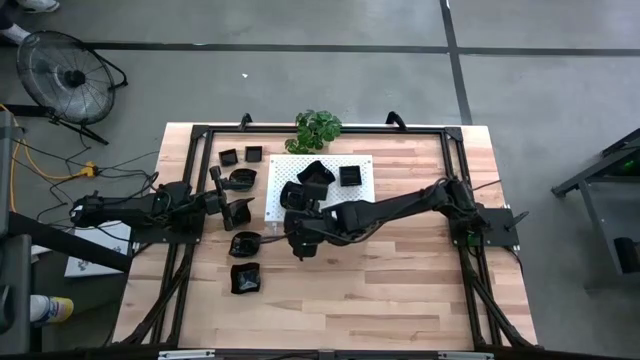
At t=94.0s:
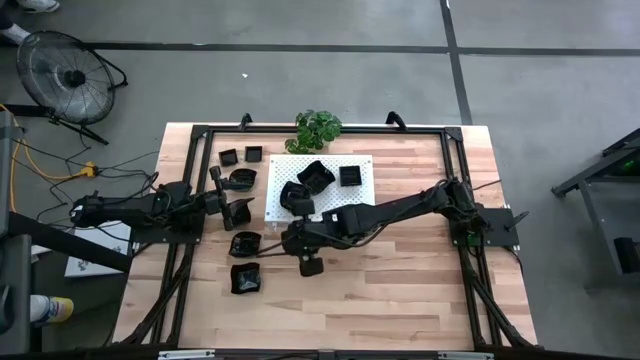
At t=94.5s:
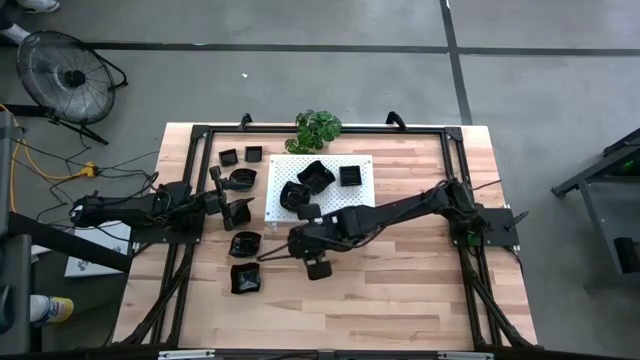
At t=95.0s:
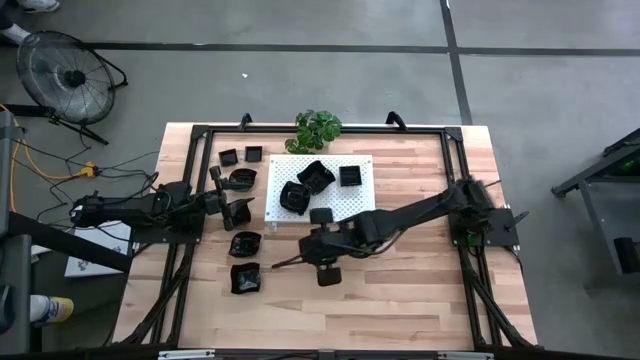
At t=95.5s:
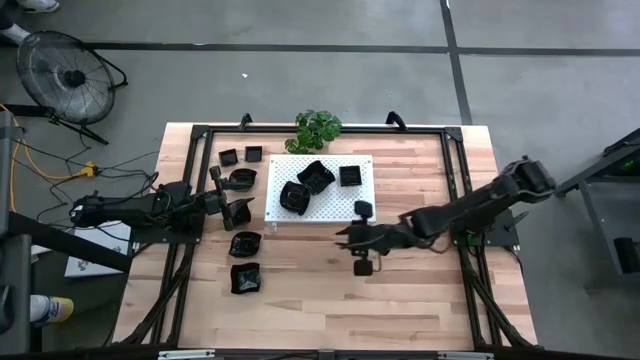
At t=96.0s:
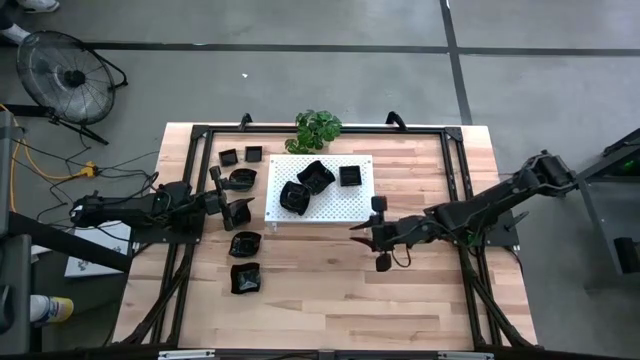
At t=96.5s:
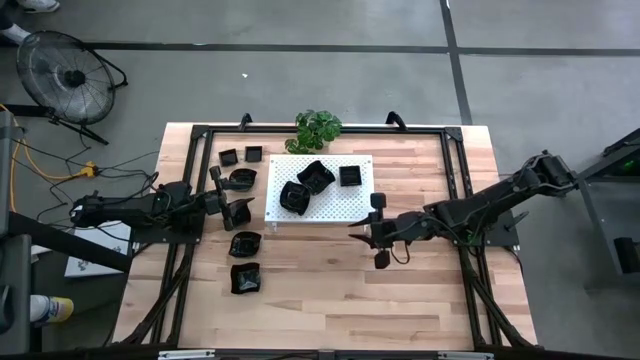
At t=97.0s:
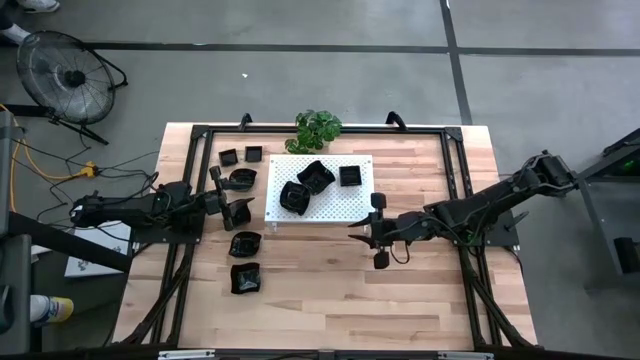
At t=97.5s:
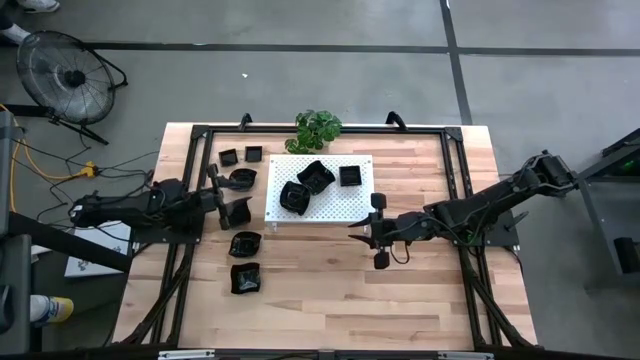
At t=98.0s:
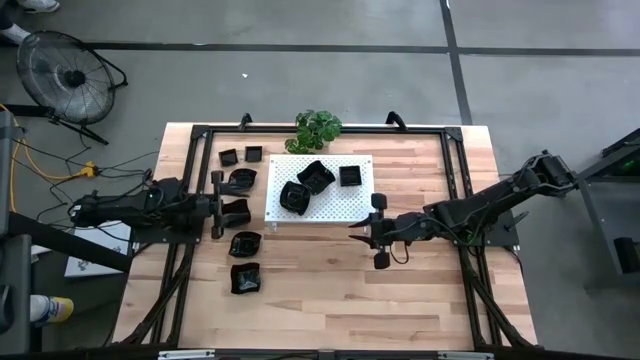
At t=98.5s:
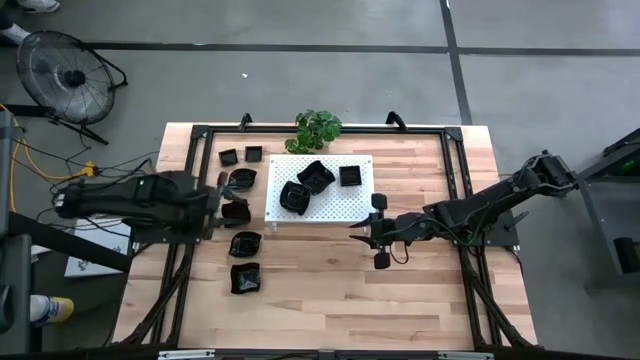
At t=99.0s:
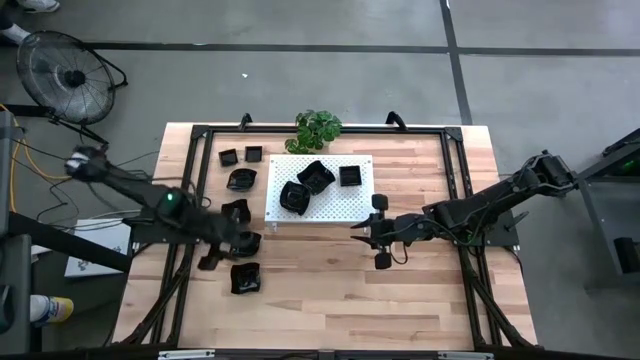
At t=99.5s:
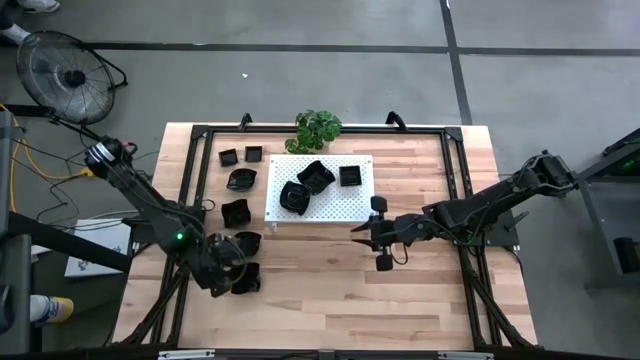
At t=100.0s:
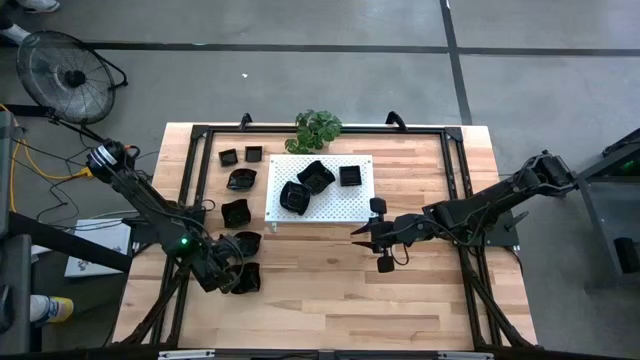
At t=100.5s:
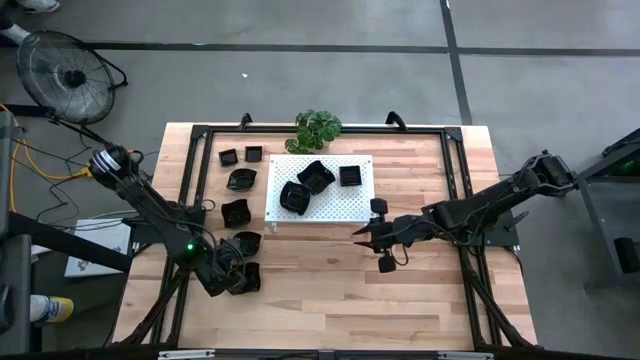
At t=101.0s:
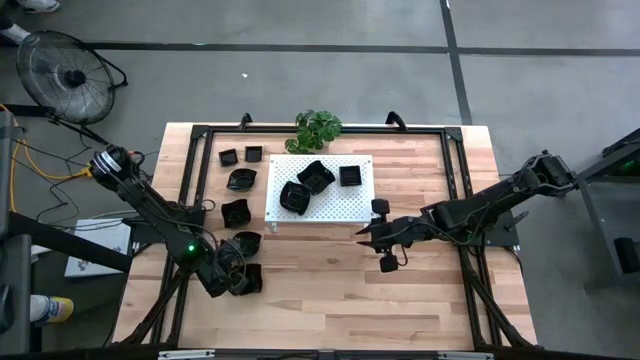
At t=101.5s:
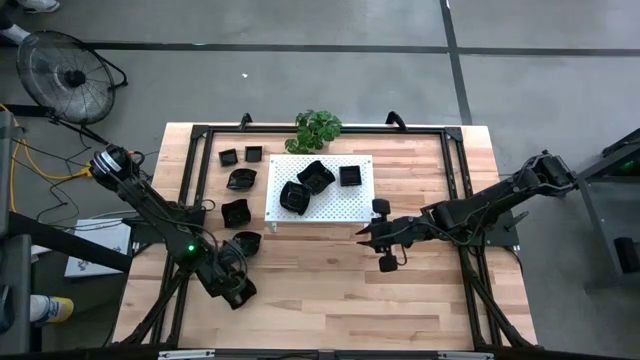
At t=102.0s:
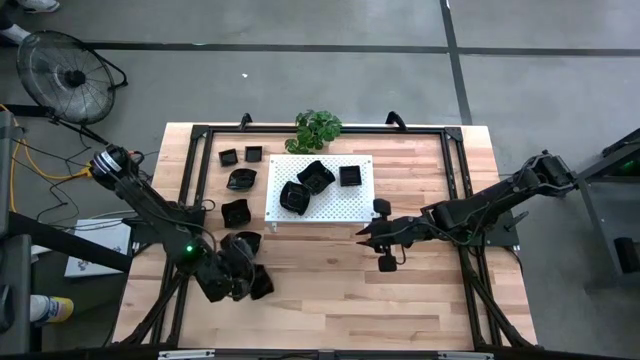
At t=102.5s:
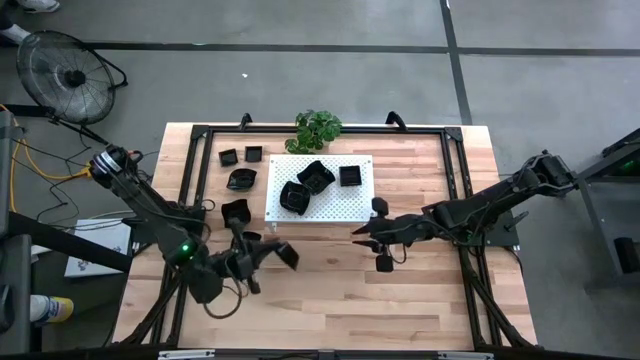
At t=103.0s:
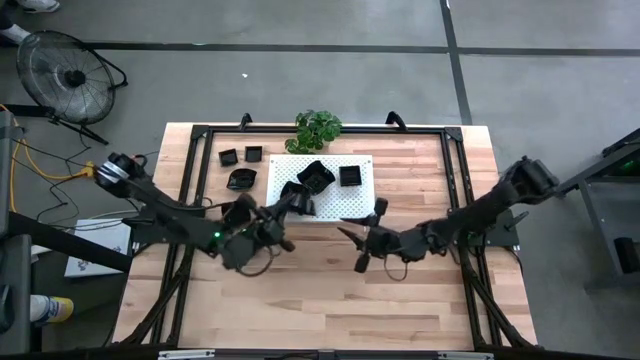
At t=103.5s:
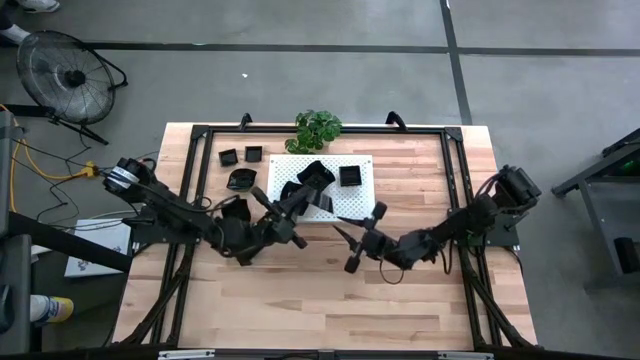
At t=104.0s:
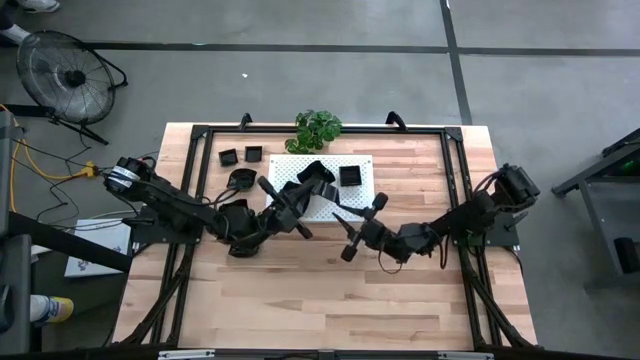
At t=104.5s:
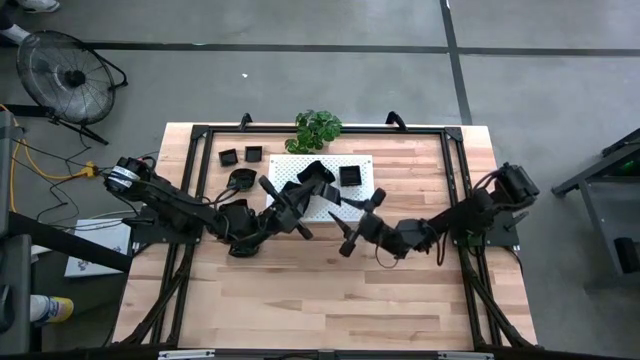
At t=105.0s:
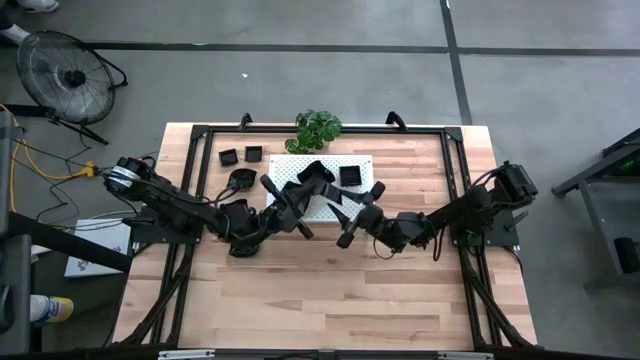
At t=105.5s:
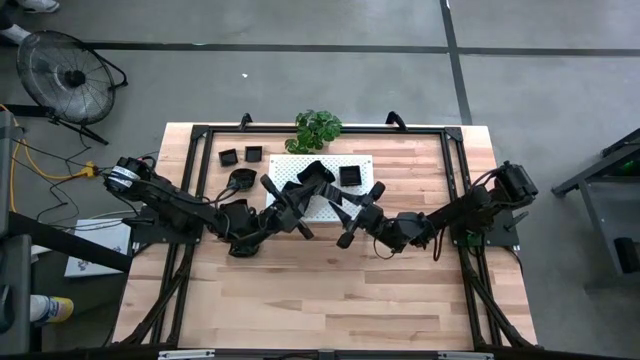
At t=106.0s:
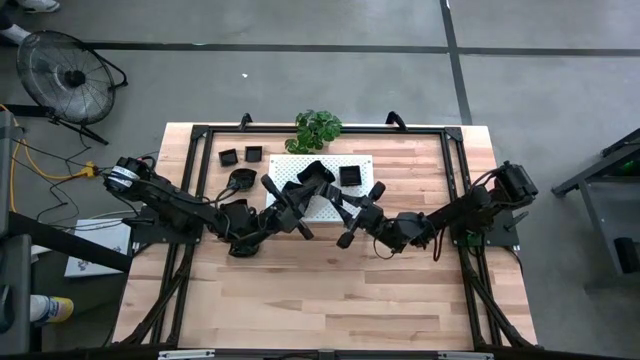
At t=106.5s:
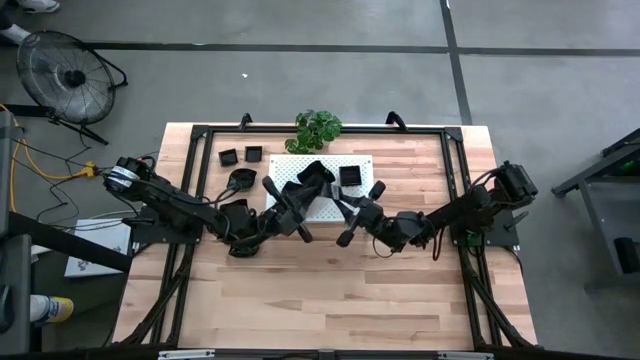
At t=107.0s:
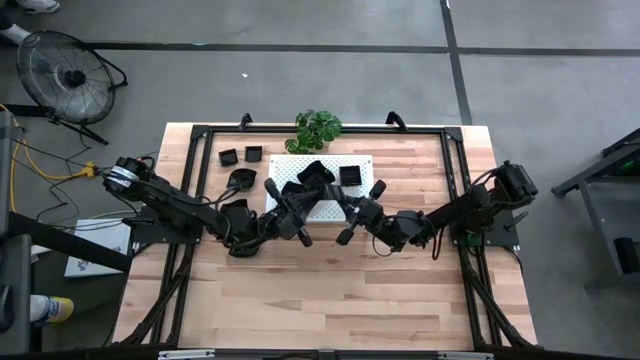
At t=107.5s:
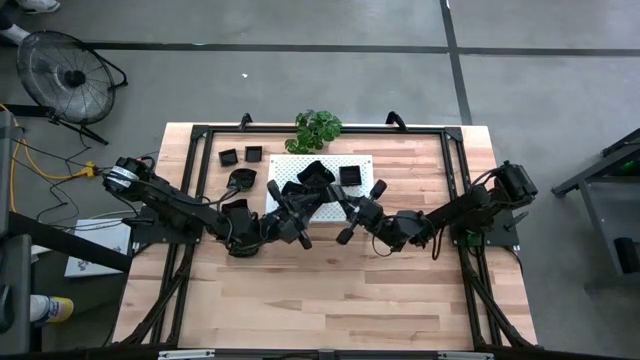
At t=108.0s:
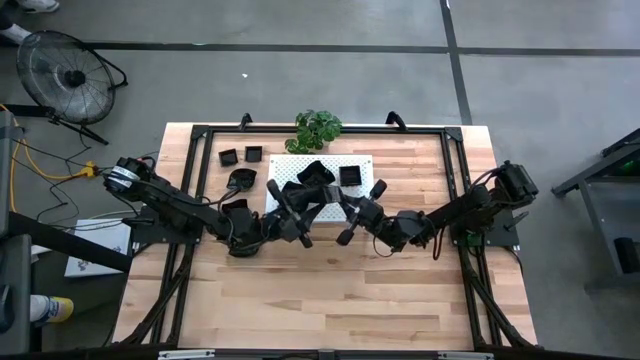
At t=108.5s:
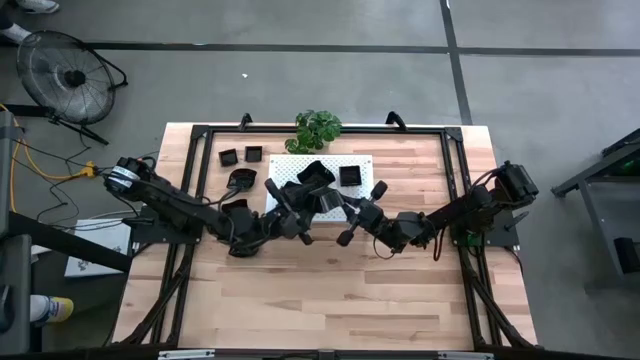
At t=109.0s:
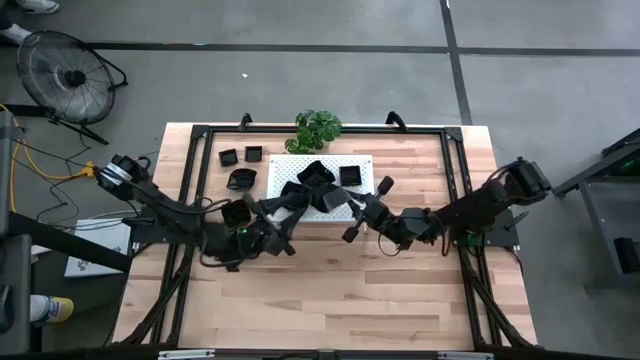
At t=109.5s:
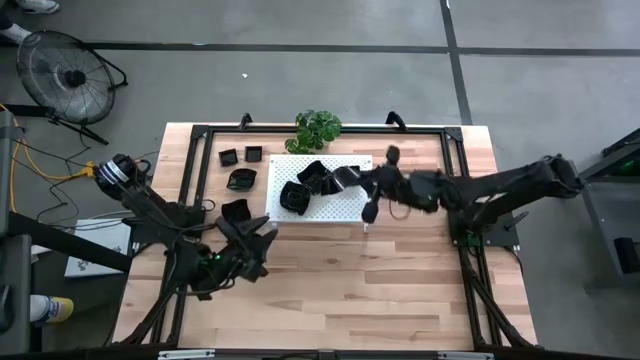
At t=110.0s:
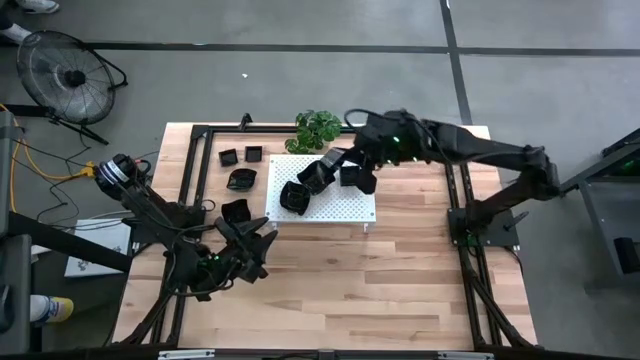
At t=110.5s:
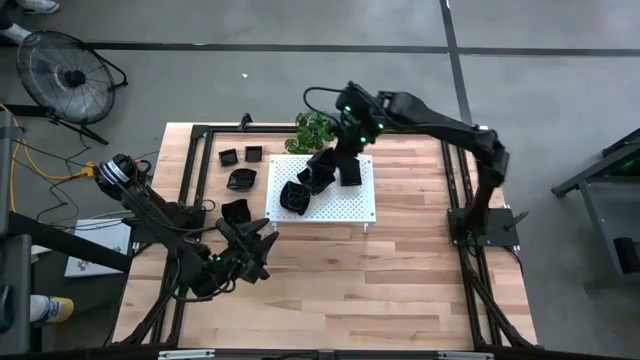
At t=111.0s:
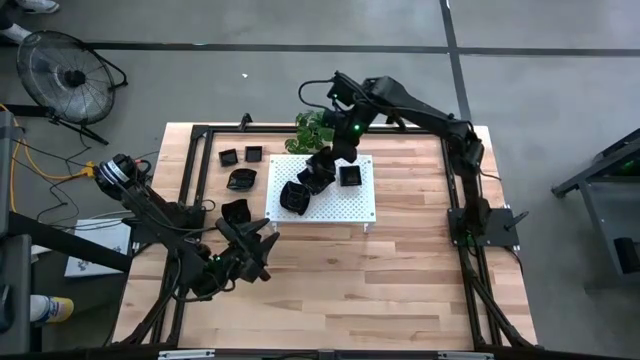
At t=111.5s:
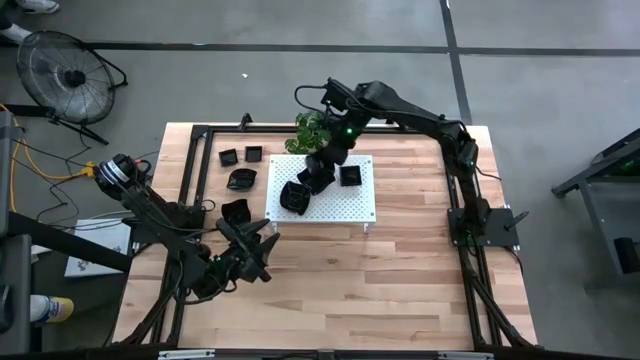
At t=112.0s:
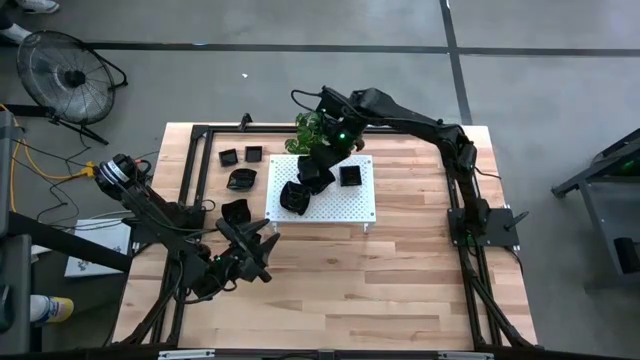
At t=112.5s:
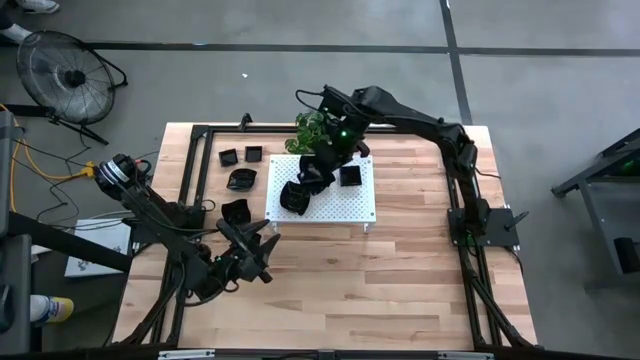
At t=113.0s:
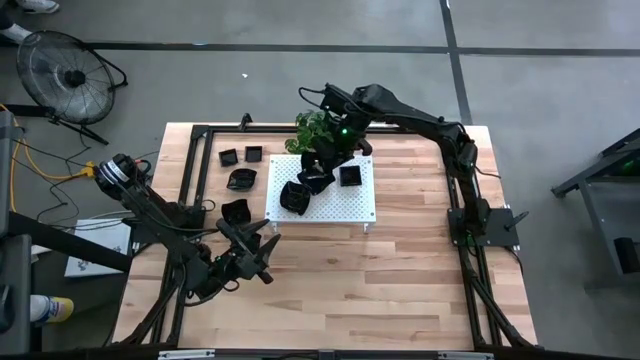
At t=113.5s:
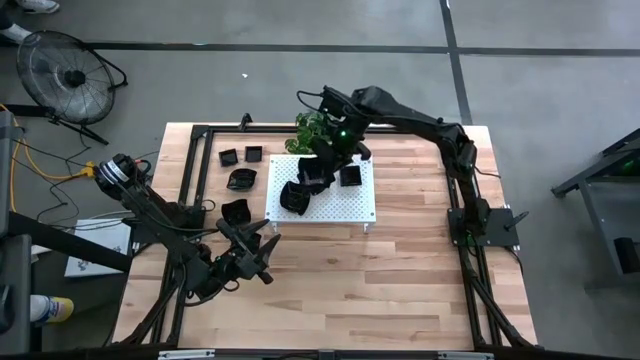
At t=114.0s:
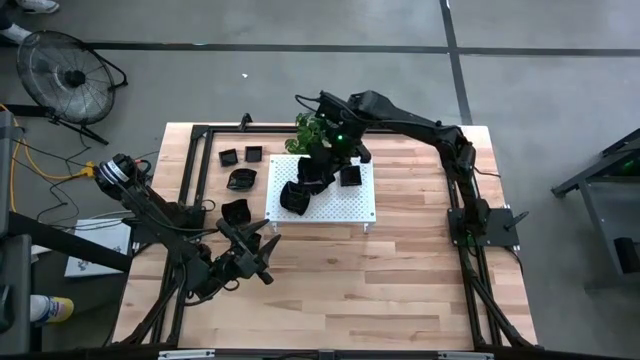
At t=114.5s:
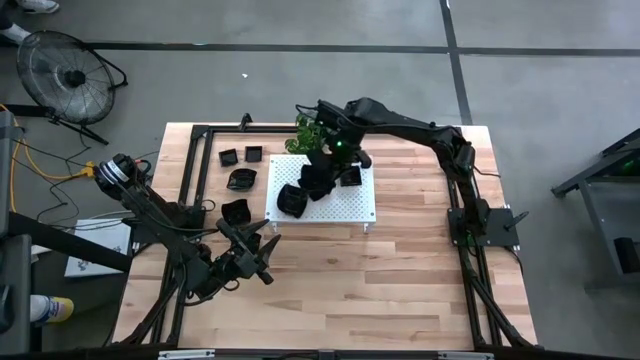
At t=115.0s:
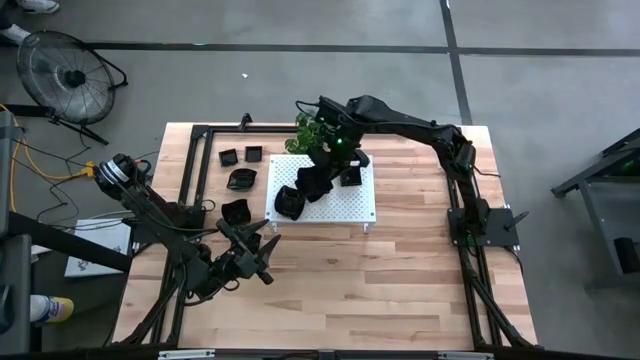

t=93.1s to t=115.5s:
Task: Pick & Place Mini shaped plates
Stack the distorted square plate on top of the distorted square plates on the shelf

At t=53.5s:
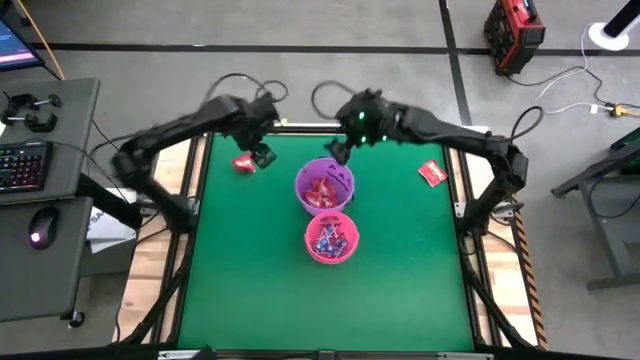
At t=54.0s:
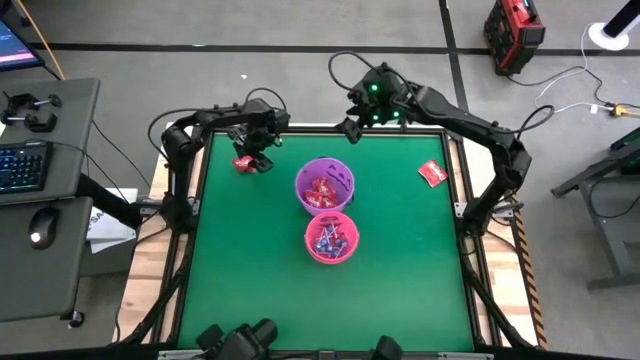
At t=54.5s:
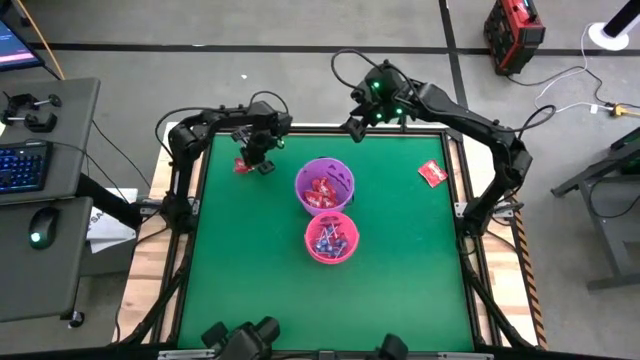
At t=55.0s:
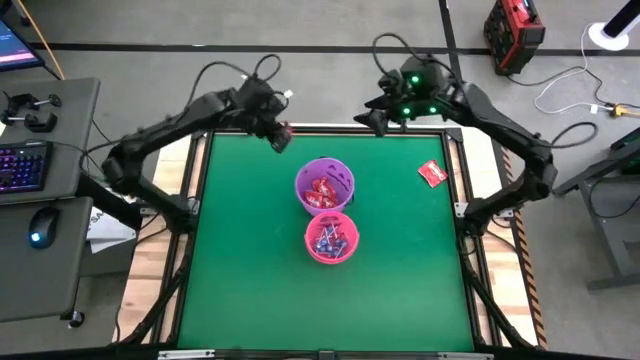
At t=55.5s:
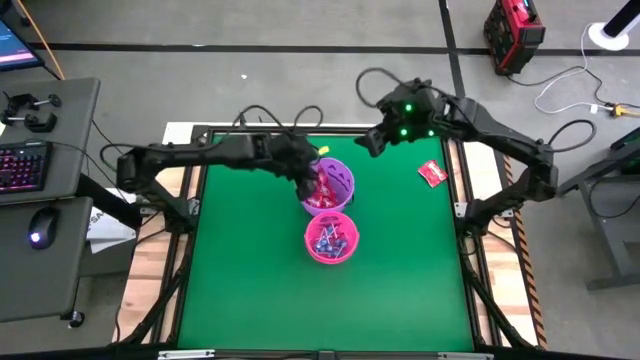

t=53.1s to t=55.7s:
Task: Sort candy by brand, put in halloween buckets
Put the red candy into the purple bucket
